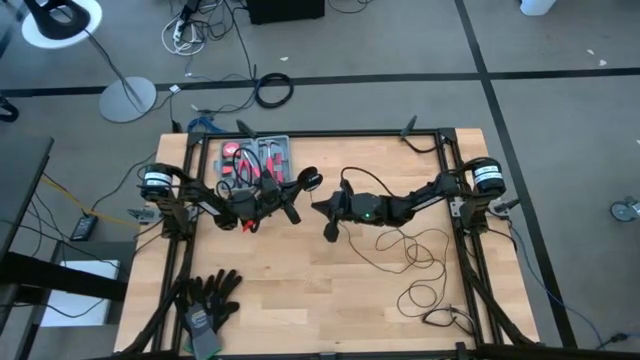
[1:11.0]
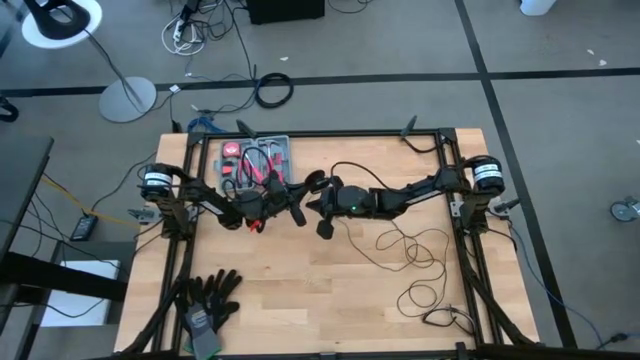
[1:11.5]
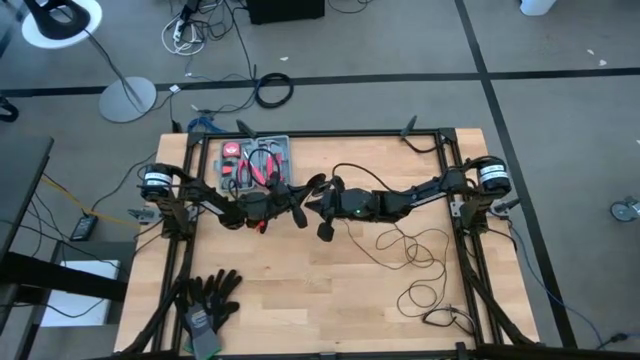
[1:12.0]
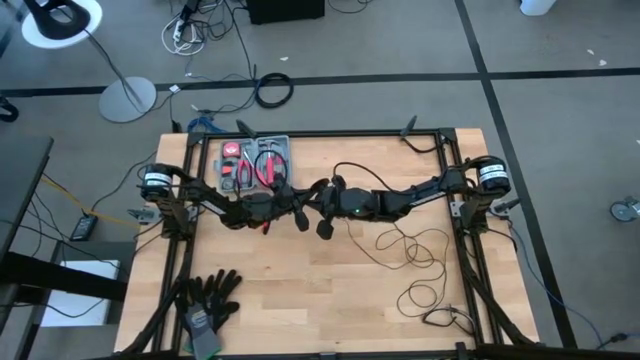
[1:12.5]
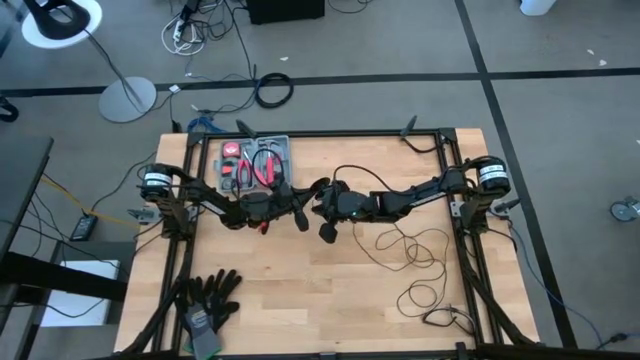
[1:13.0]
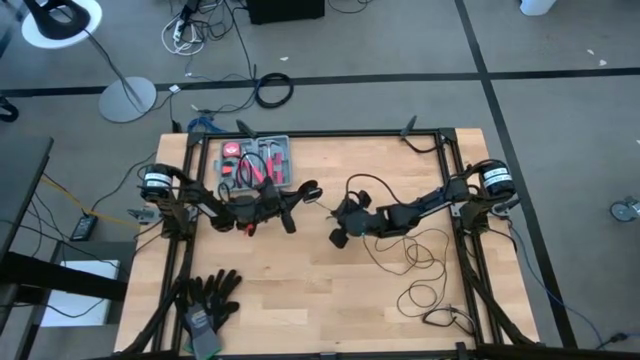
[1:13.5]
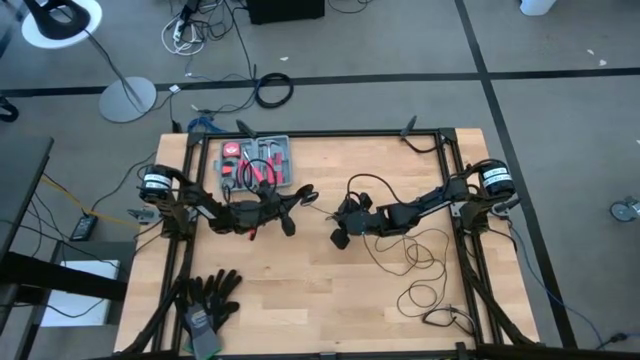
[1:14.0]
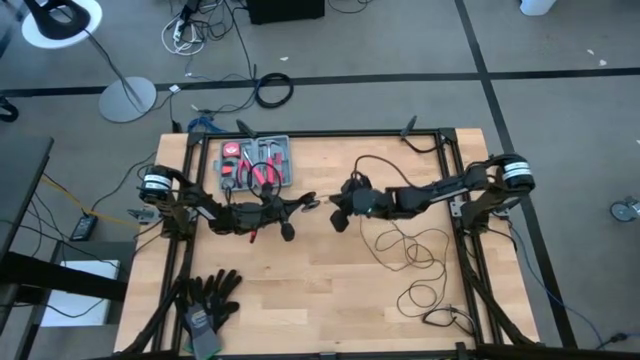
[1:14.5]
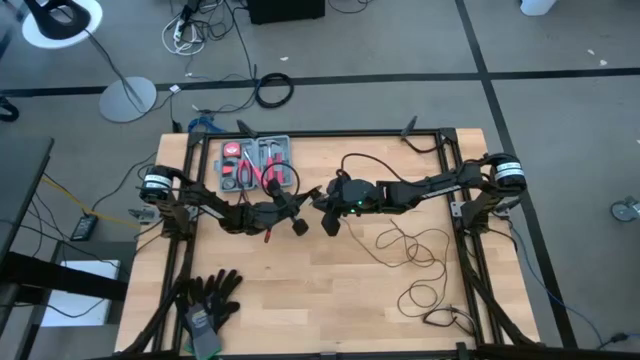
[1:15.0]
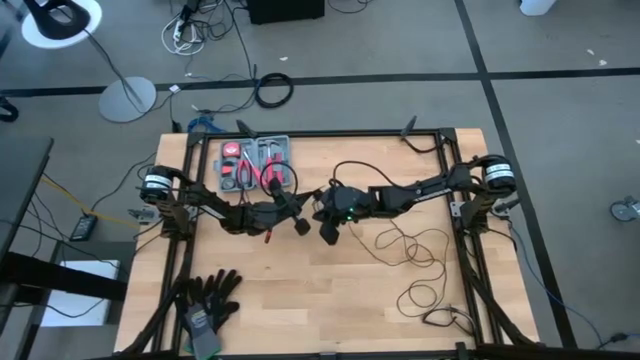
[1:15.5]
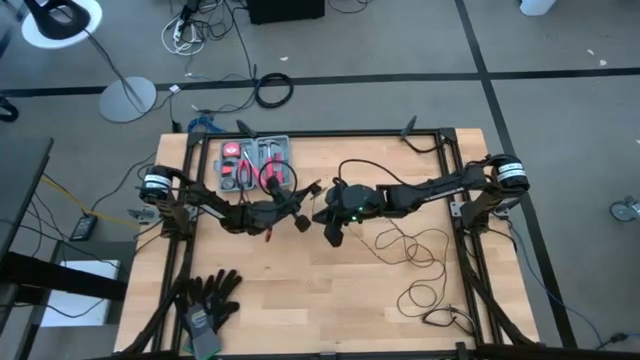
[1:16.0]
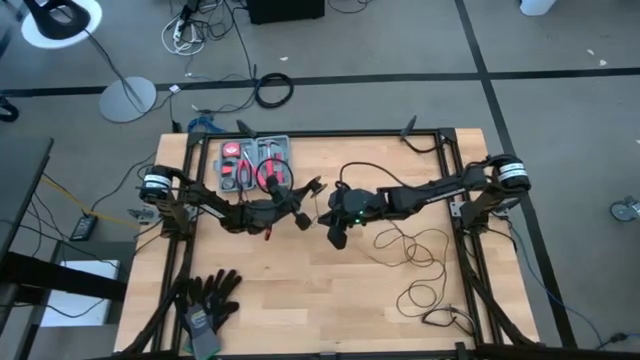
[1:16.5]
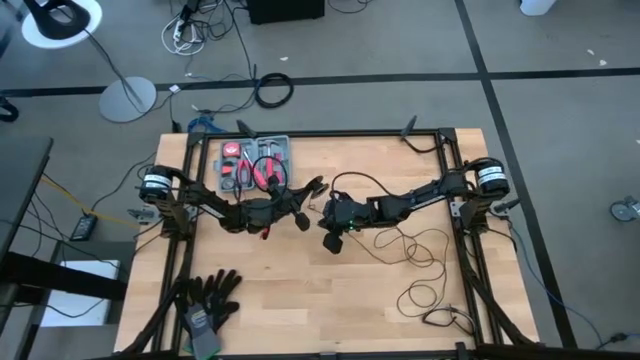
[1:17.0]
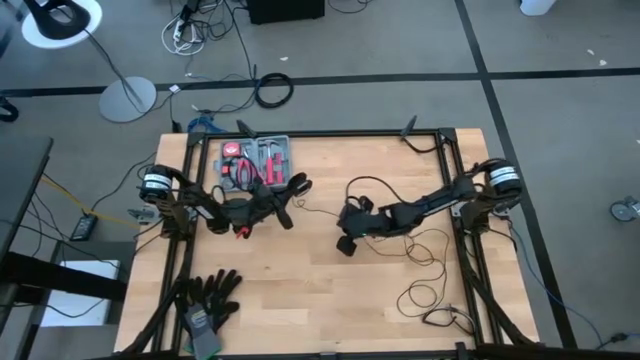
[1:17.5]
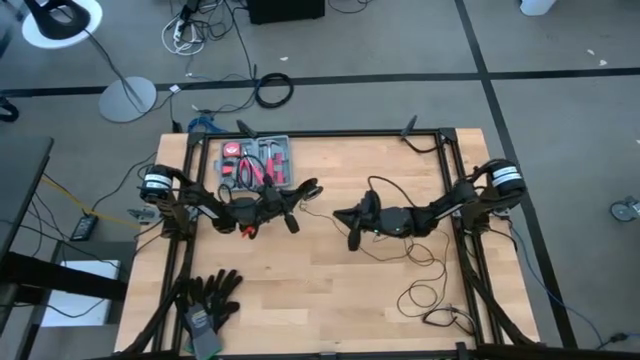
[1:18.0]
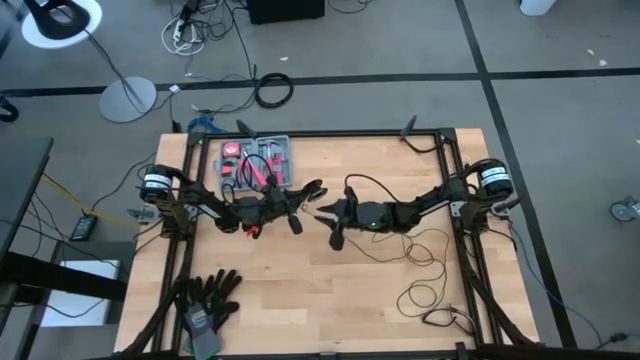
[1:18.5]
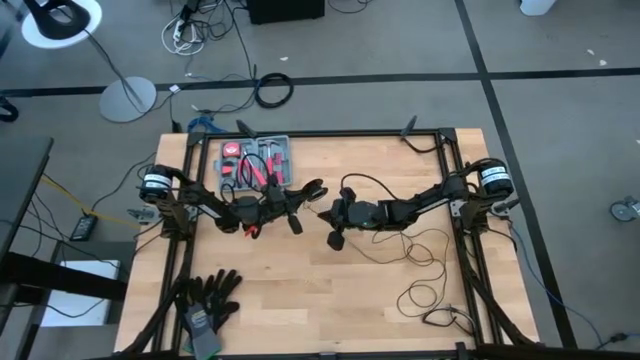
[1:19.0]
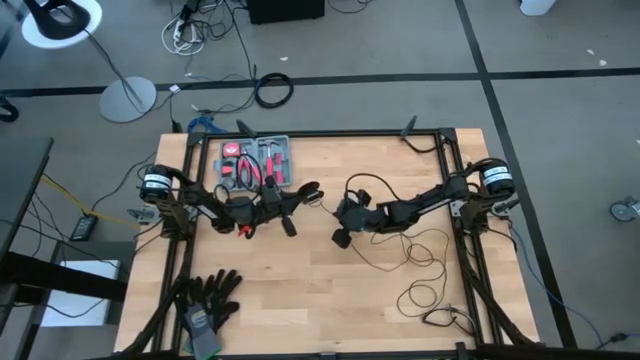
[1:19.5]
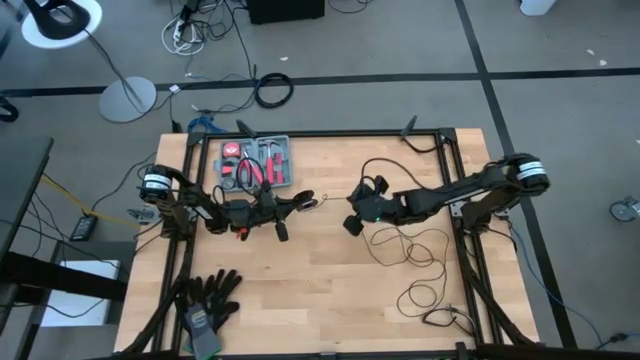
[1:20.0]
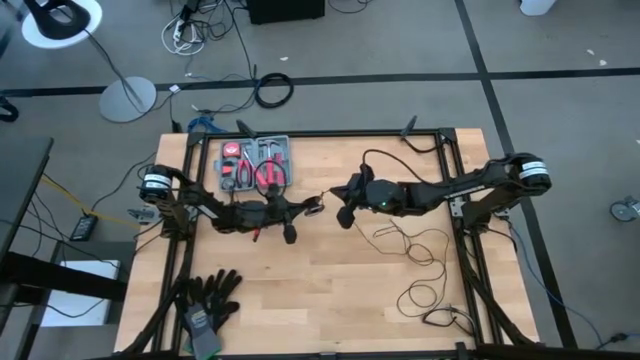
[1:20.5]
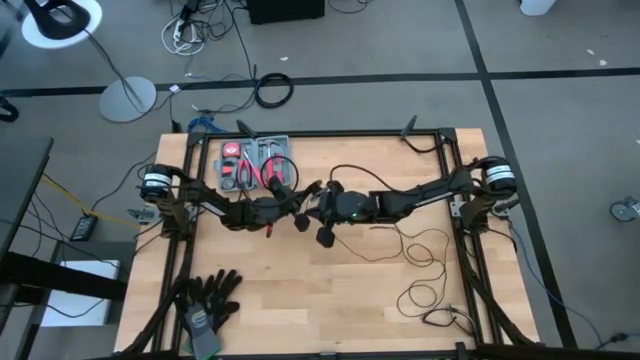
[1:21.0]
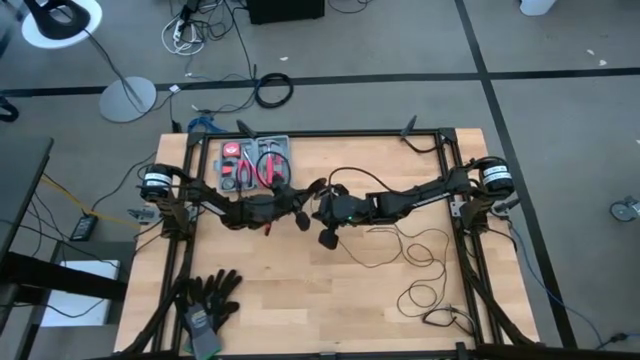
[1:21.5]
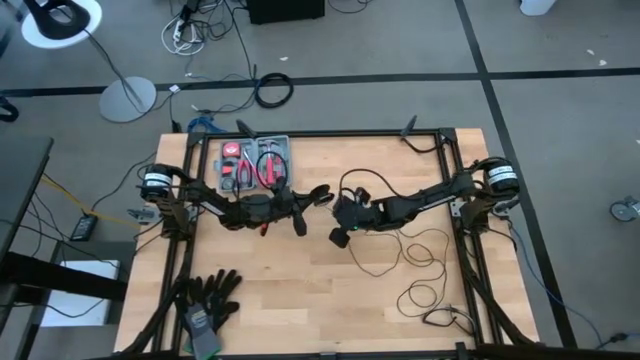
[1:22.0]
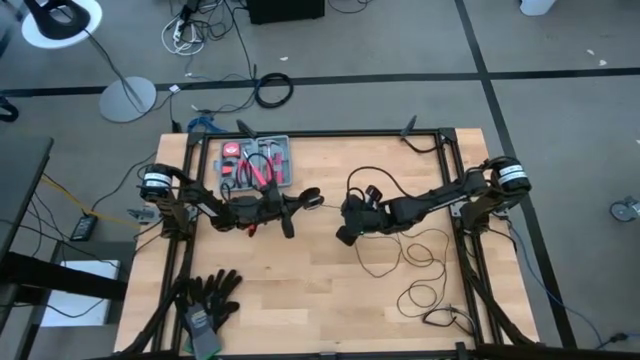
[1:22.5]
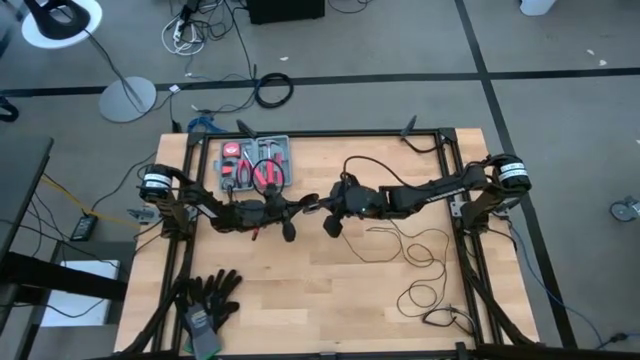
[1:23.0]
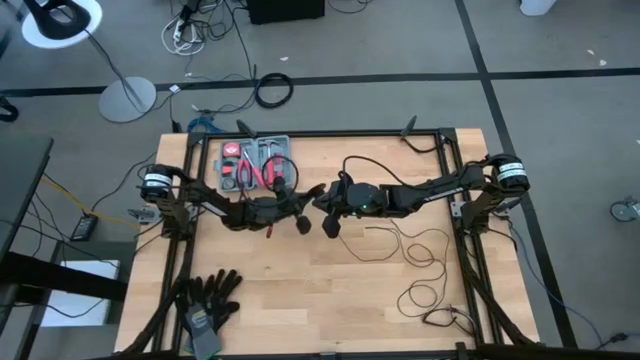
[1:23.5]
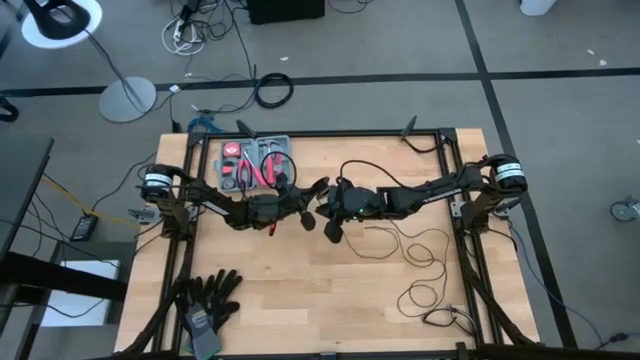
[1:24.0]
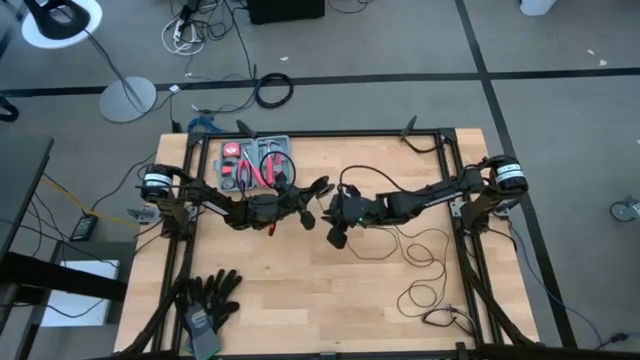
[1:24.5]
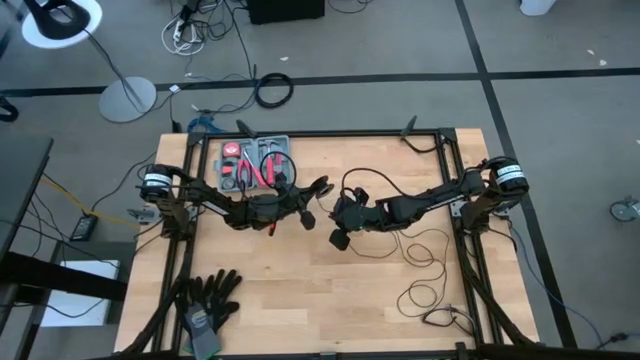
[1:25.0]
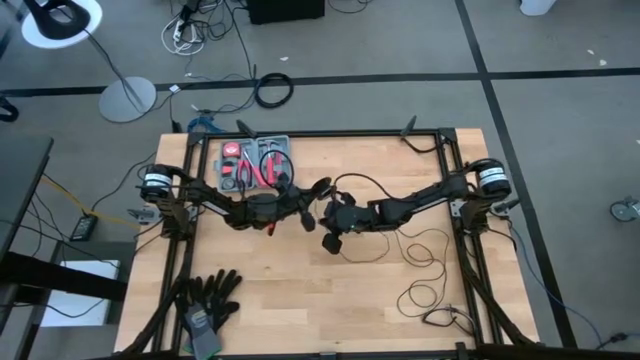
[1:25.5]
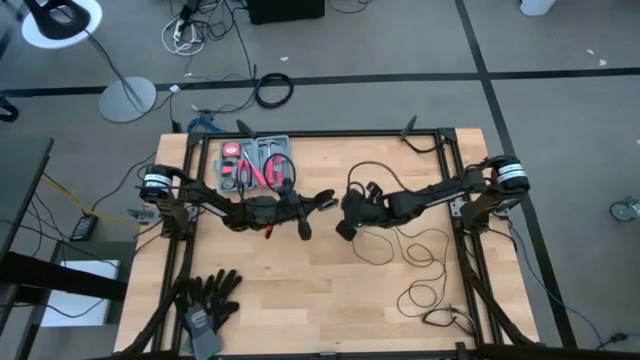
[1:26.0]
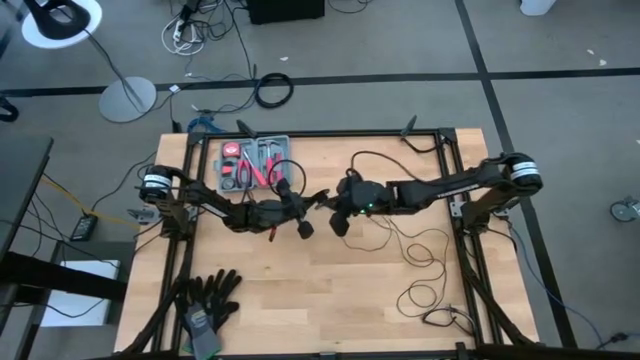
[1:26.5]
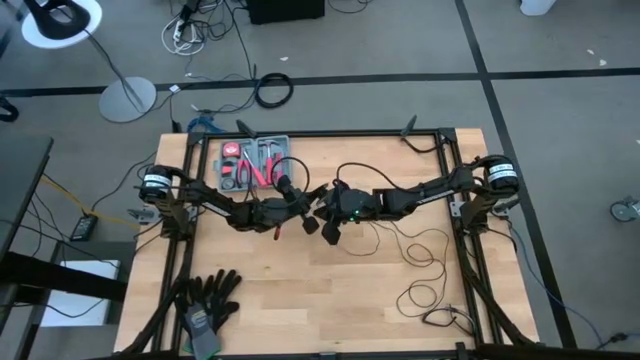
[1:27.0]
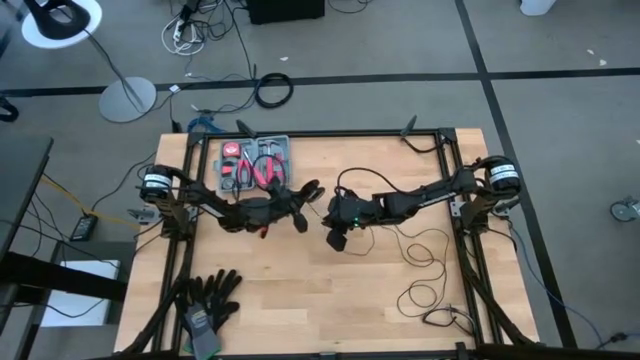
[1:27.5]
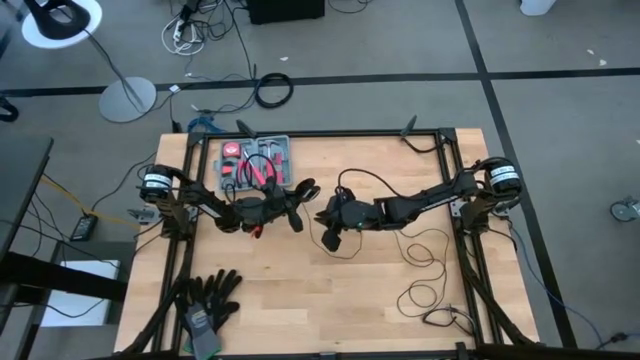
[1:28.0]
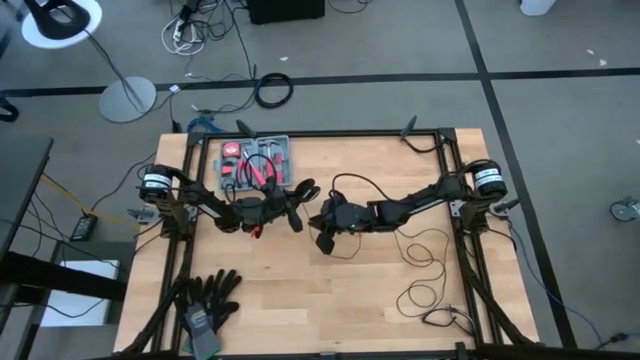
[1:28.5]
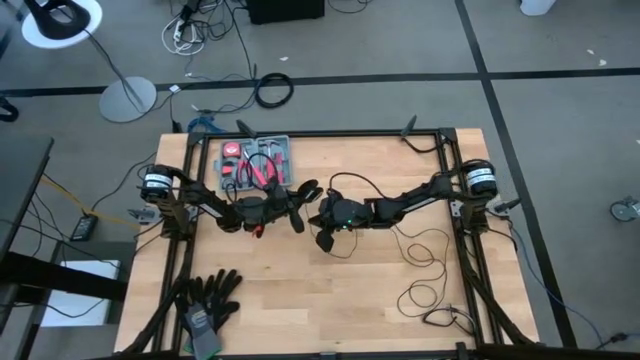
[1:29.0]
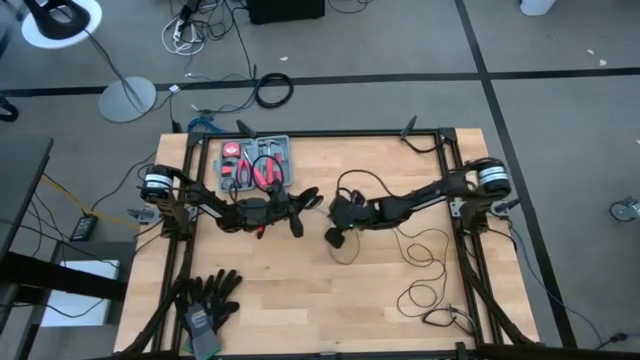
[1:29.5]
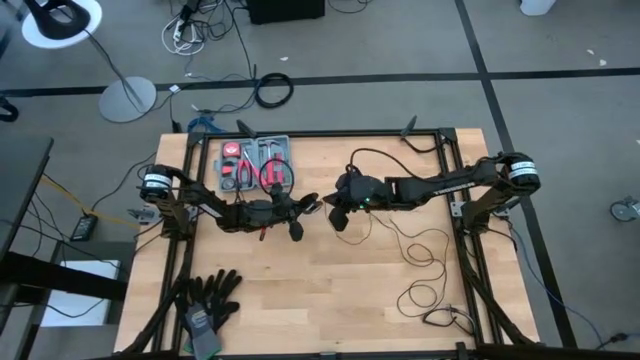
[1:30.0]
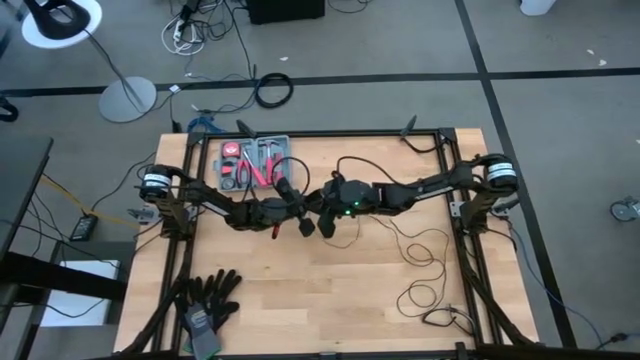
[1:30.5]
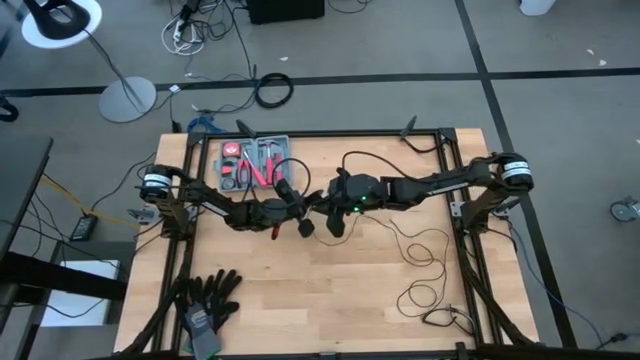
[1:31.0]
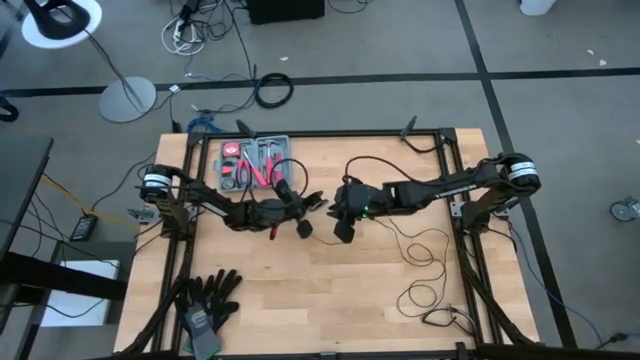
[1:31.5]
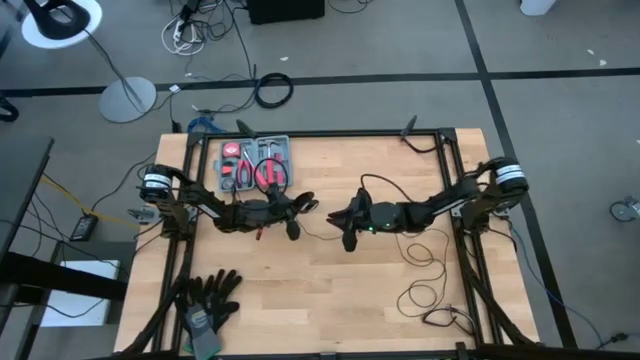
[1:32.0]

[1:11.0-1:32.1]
Task: Coil cords
Coil the black cable wire on the spool
